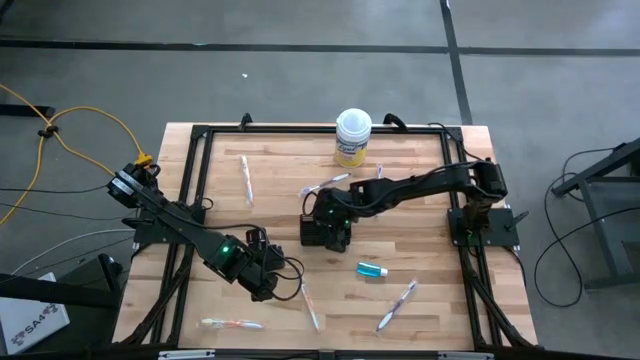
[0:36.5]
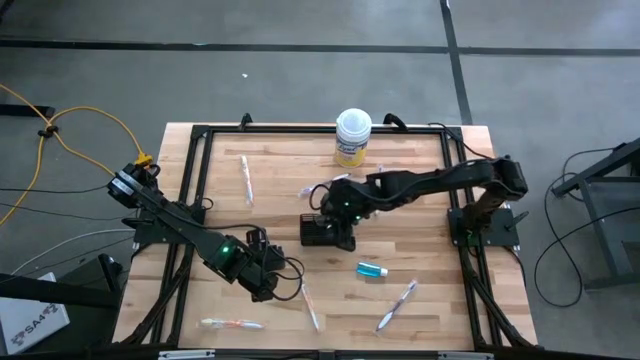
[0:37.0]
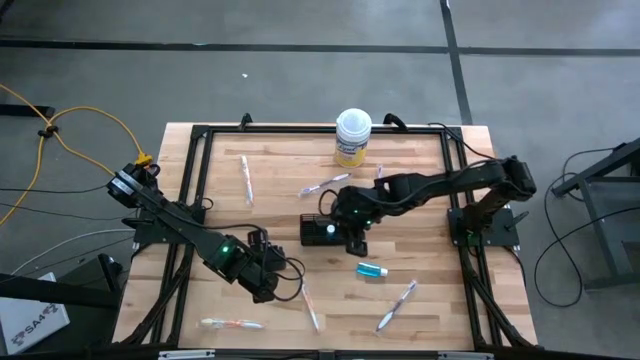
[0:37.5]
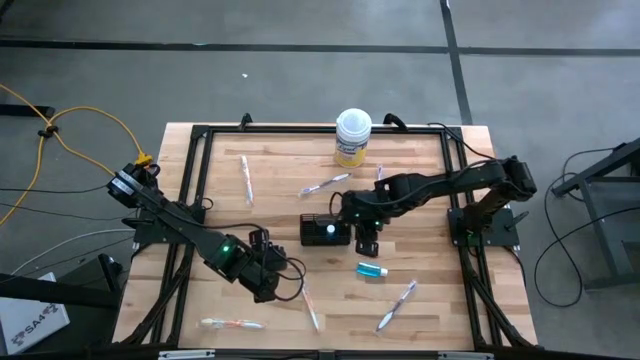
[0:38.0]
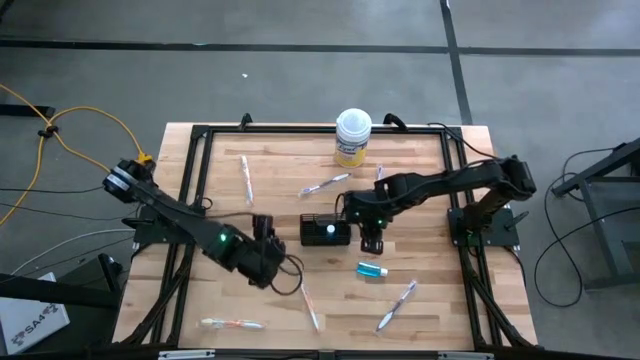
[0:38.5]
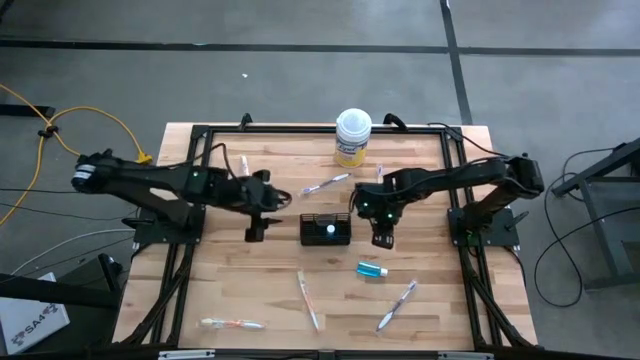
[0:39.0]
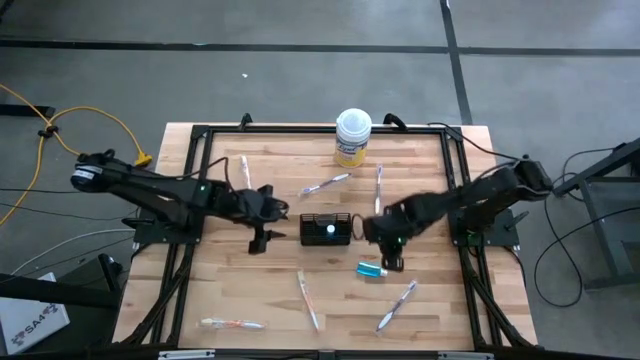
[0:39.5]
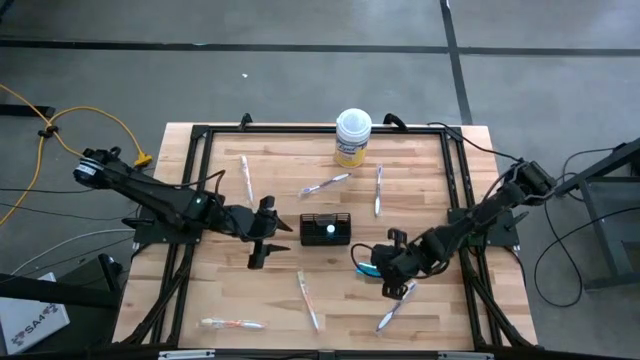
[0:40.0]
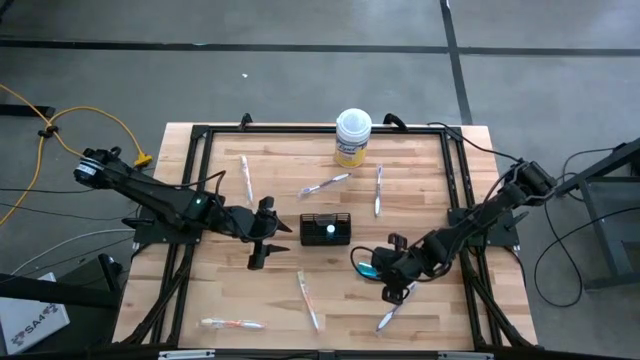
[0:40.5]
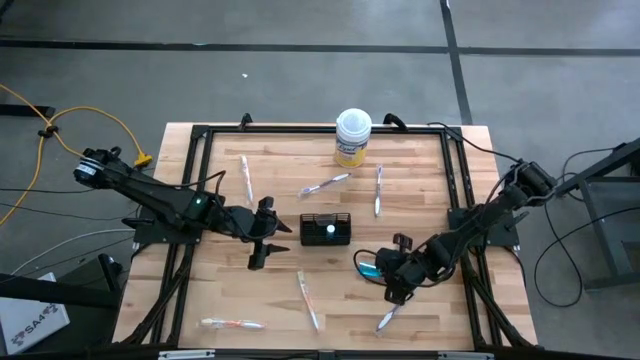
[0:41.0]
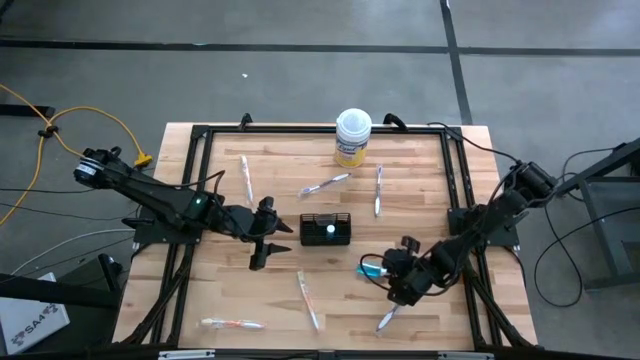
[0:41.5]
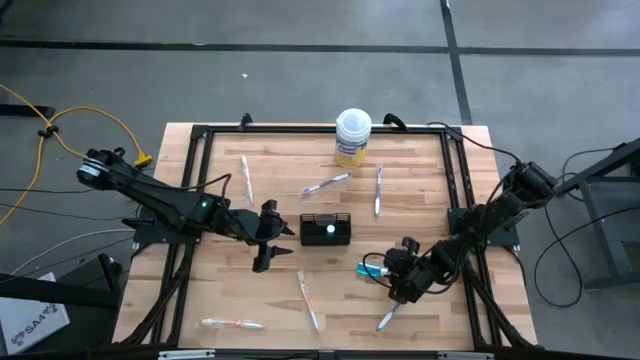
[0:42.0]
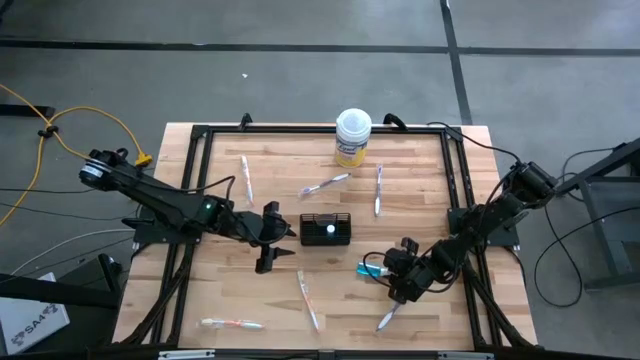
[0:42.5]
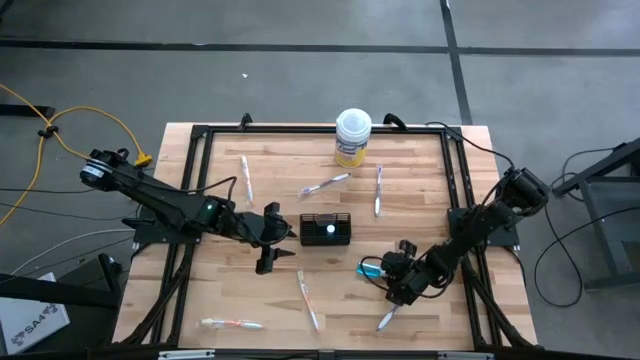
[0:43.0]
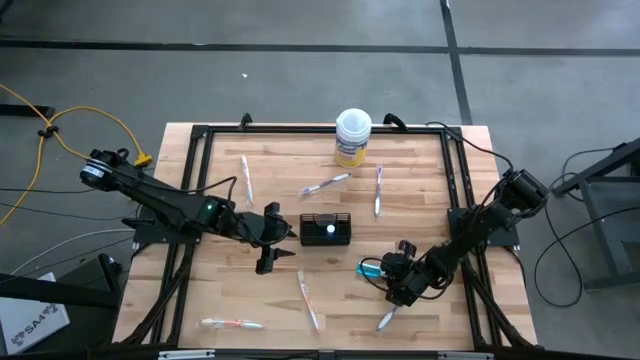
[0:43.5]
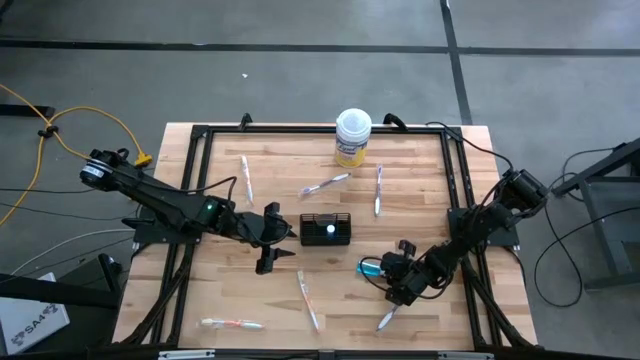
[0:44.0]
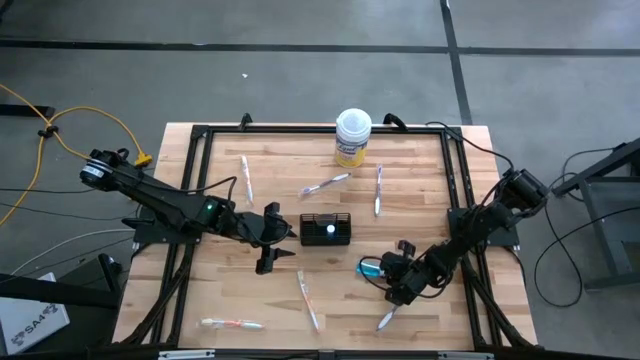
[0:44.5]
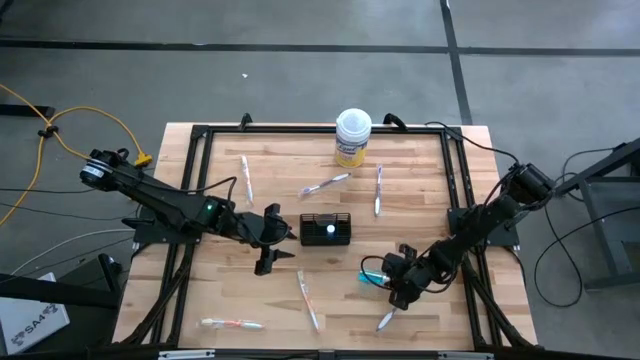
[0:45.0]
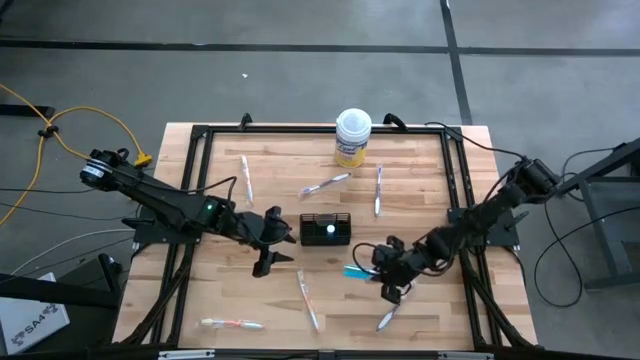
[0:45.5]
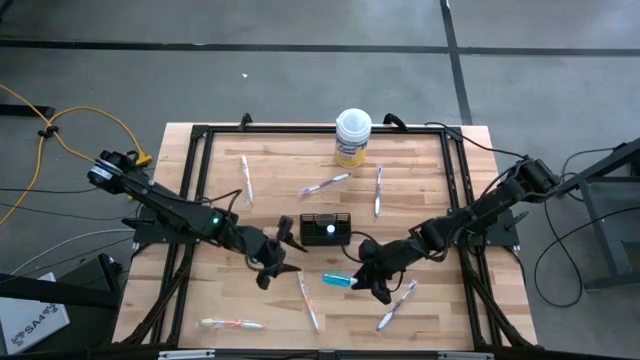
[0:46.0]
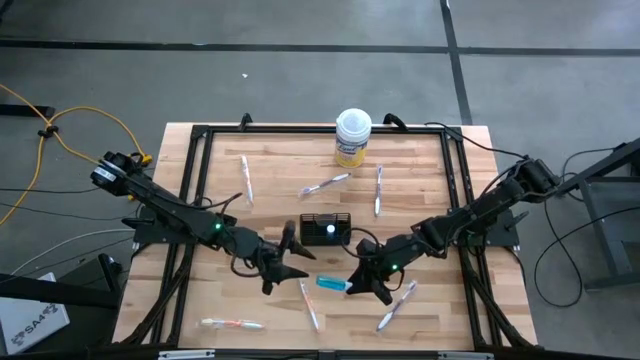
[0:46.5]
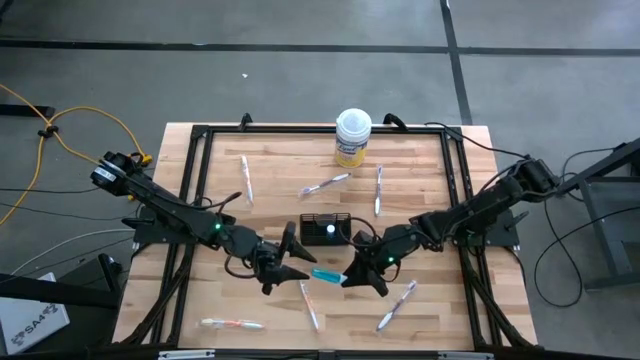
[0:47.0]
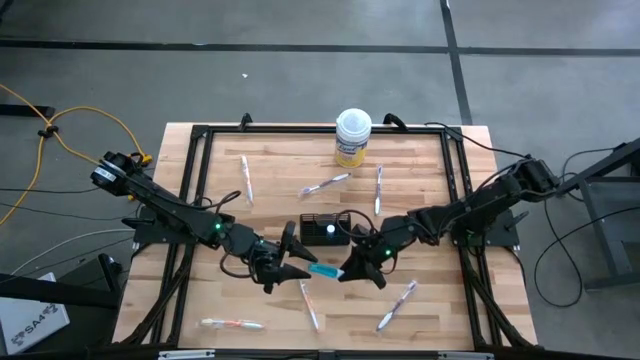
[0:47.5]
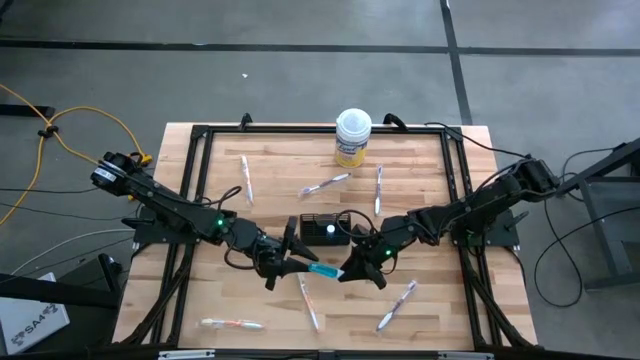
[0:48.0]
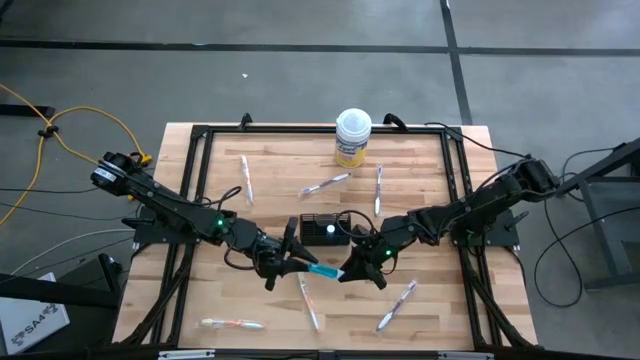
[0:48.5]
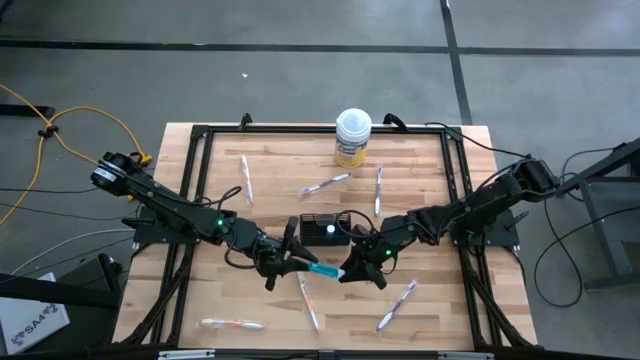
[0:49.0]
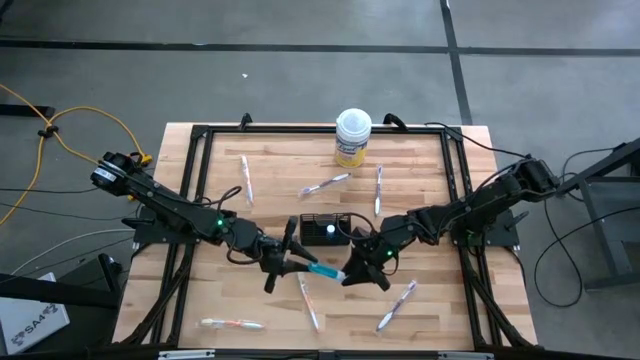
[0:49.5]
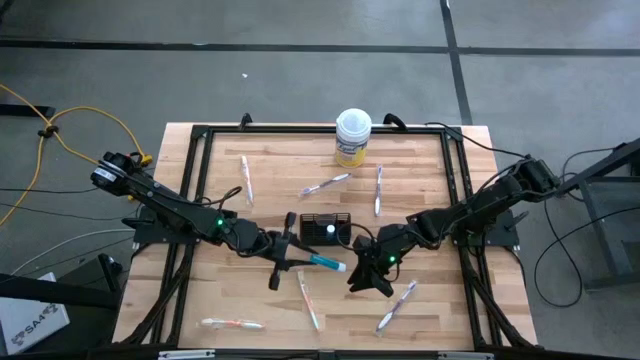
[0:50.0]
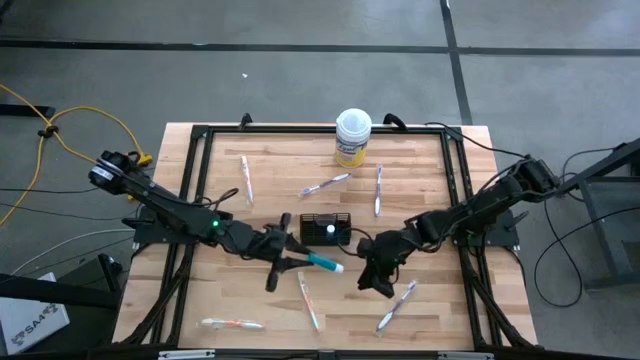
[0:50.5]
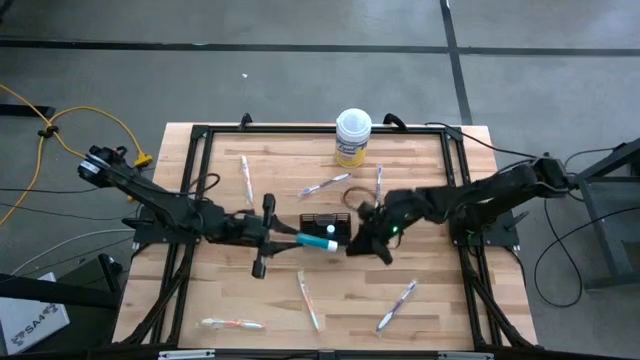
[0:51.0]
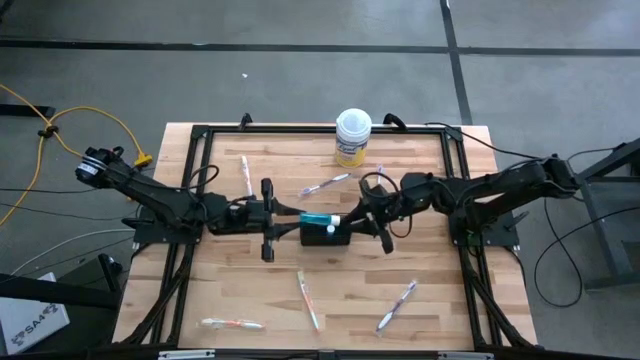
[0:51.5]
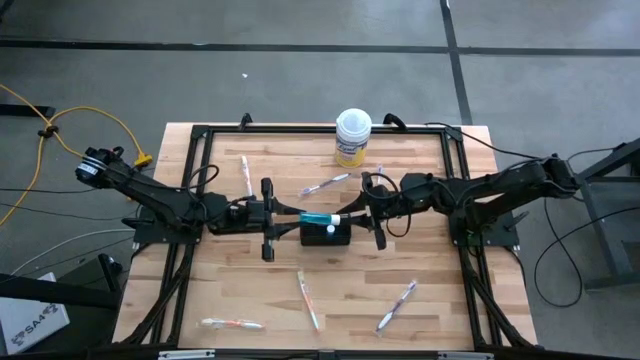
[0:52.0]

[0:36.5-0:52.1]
Task: Pick & Place toothbrushing station
Put the blue mouthwash into the wire organizer

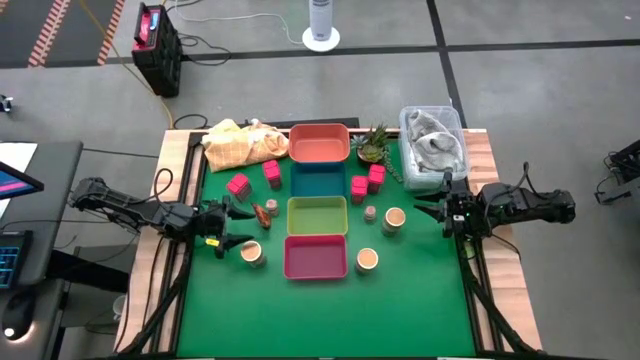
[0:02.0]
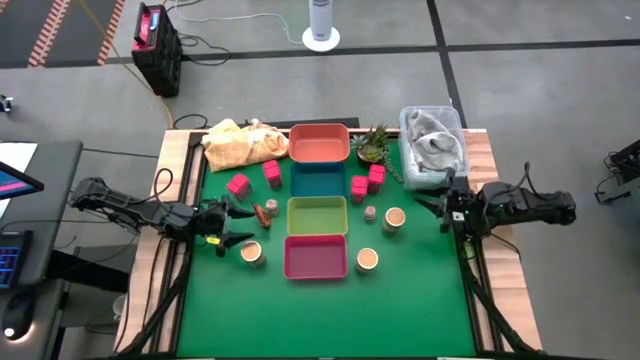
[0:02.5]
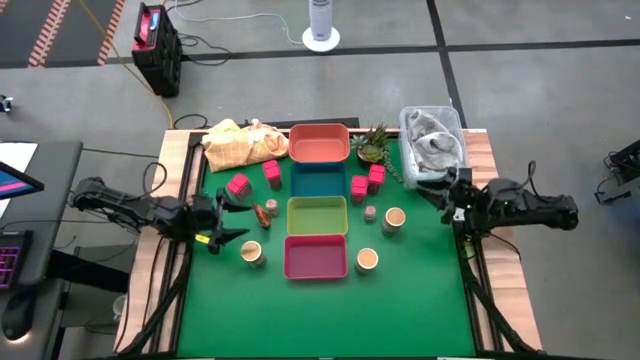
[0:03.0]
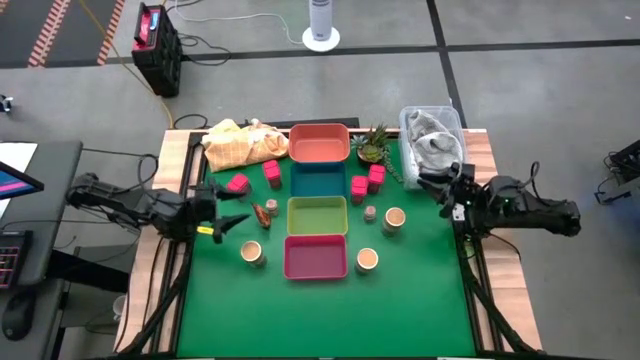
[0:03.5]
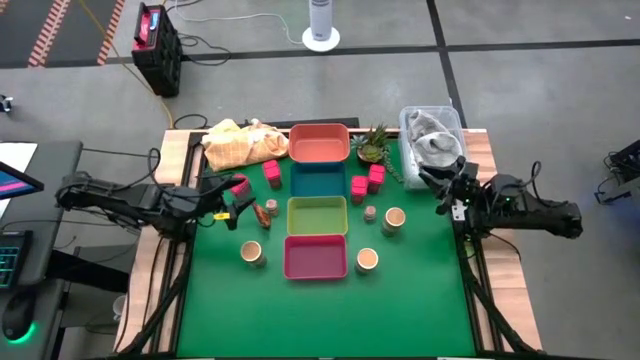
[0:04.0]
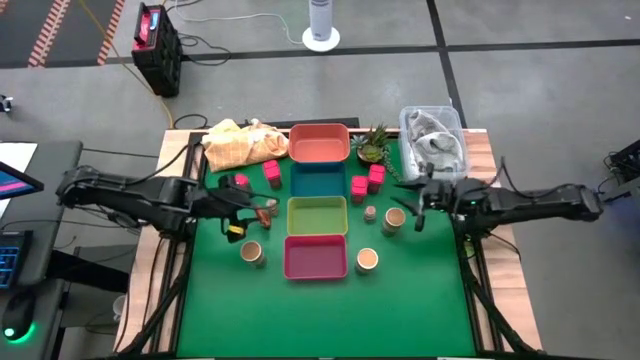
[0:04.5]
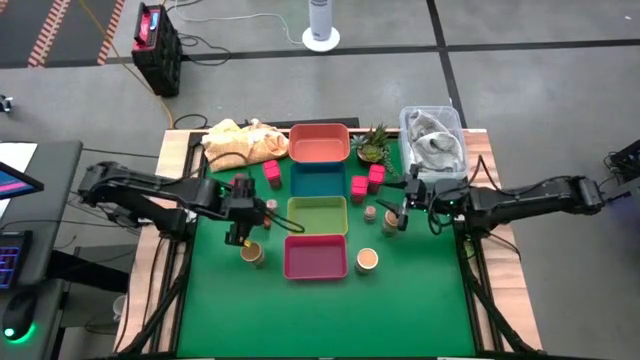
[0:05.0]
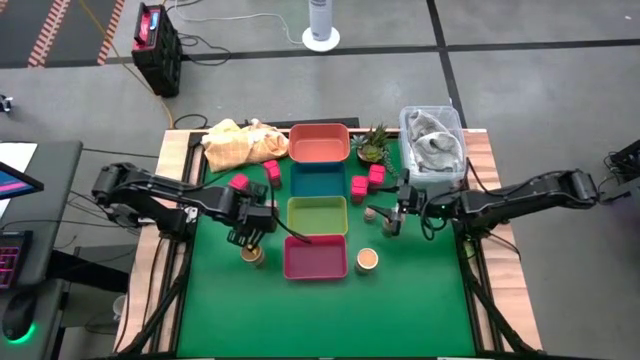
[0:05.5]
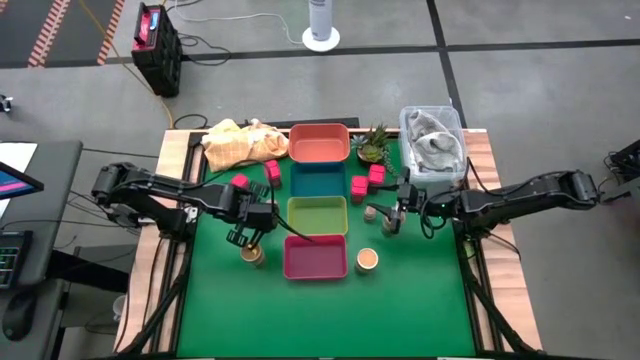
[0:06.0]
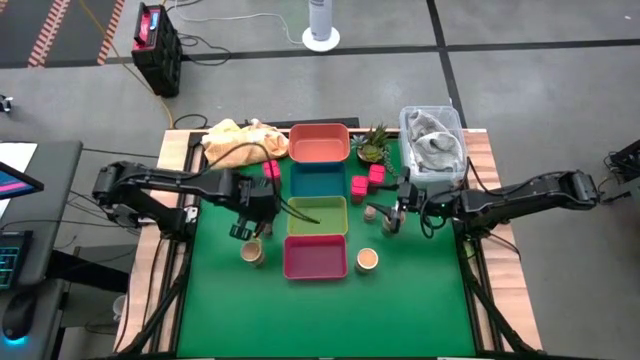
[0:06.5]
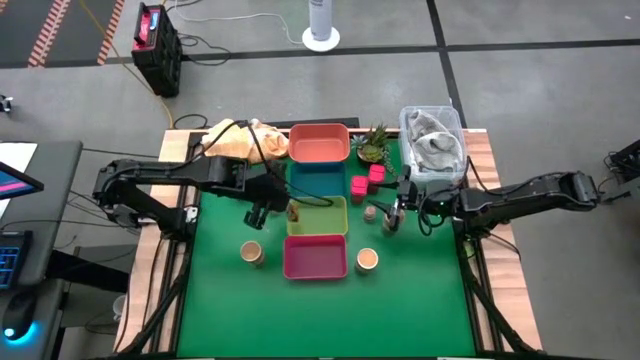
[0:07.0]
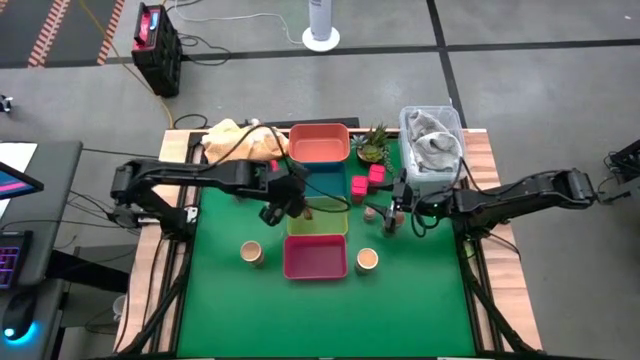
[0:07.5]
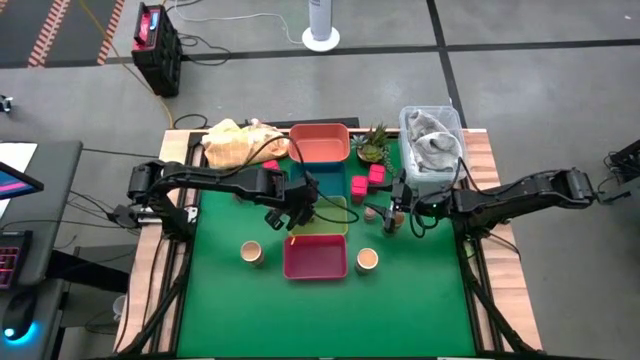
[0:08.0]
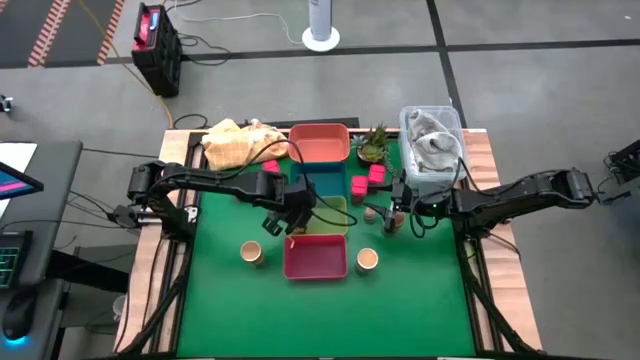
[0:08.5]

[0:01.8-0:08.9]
Task: Sort spices by type
Put the orange seasoning pack into the yellow bin
